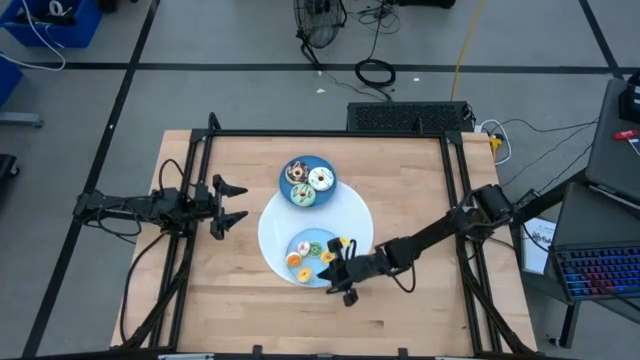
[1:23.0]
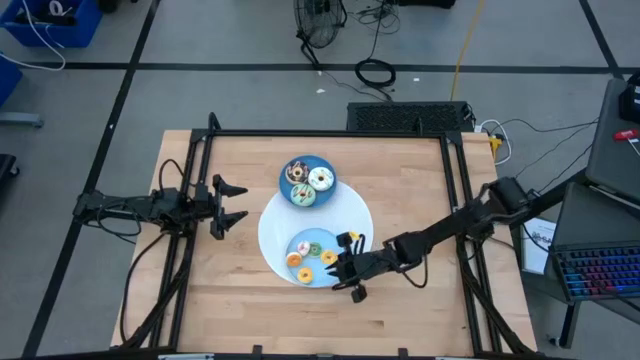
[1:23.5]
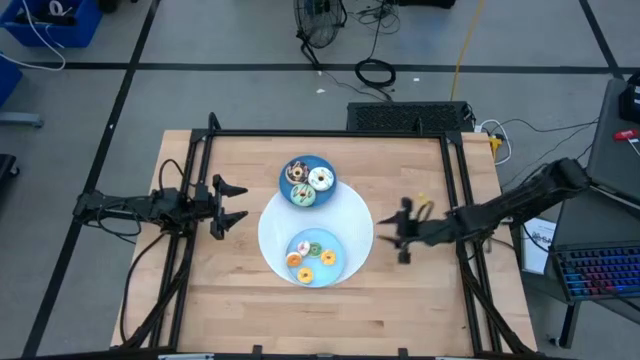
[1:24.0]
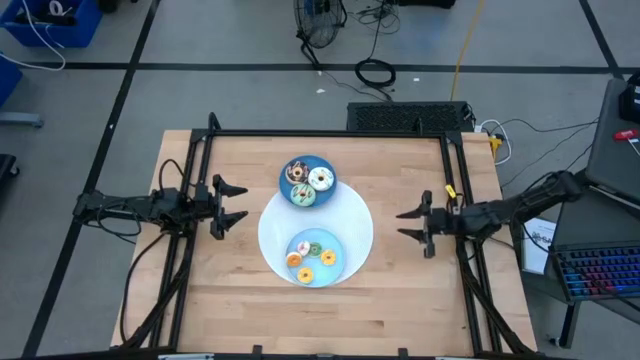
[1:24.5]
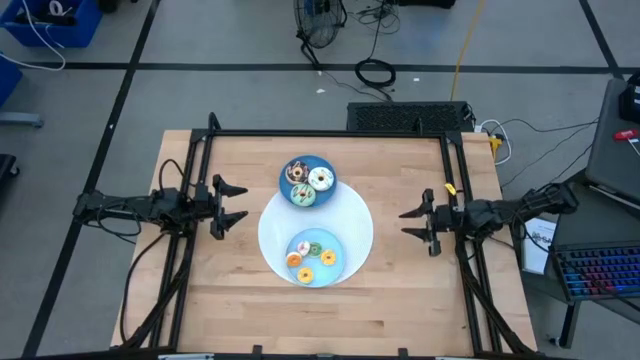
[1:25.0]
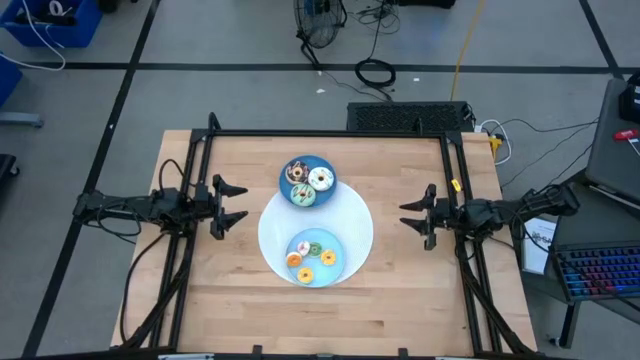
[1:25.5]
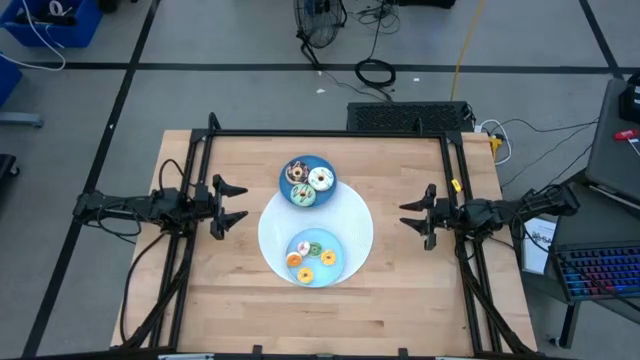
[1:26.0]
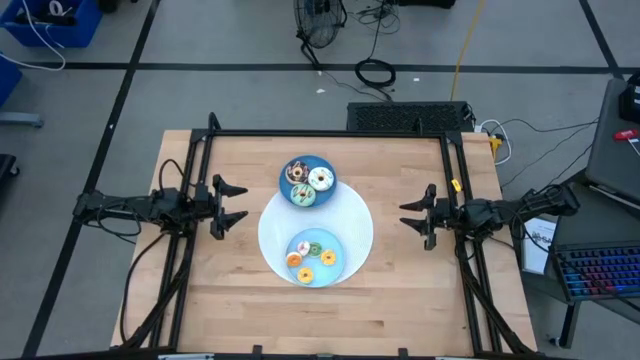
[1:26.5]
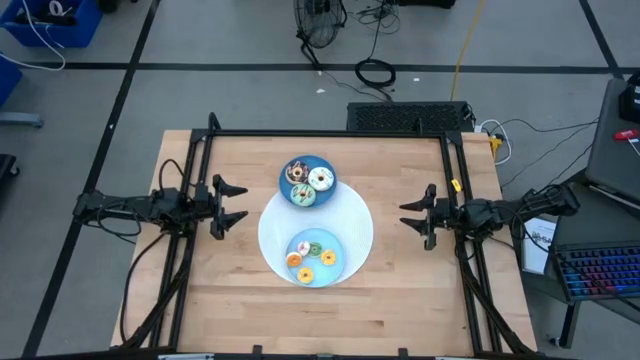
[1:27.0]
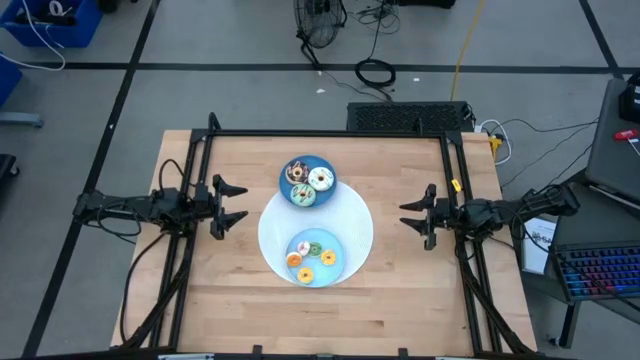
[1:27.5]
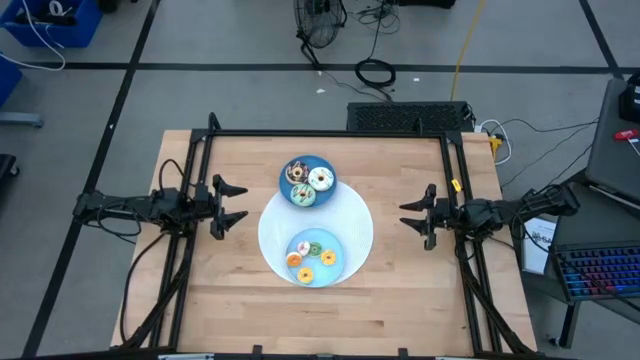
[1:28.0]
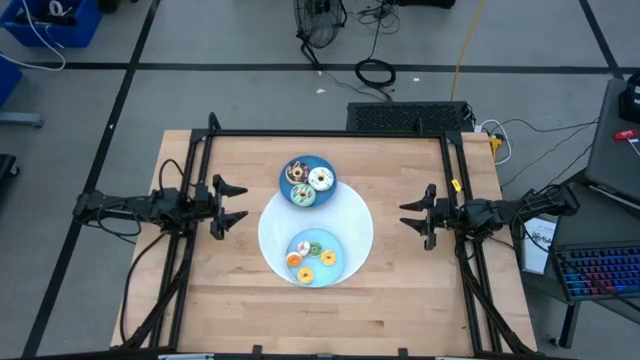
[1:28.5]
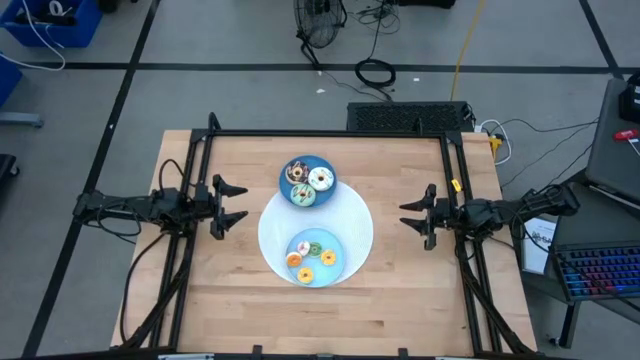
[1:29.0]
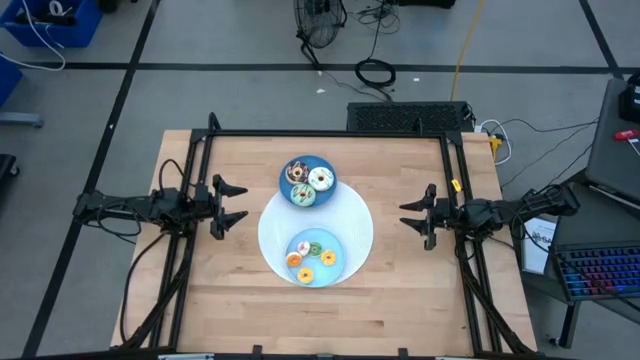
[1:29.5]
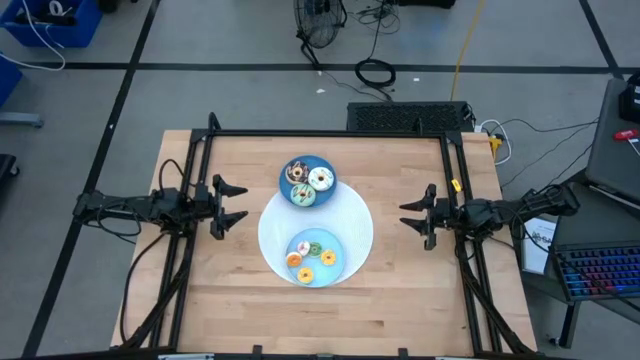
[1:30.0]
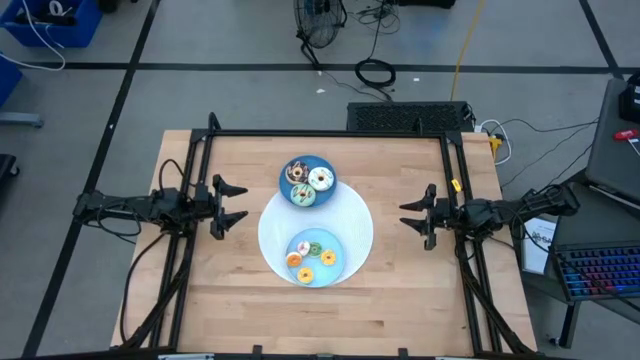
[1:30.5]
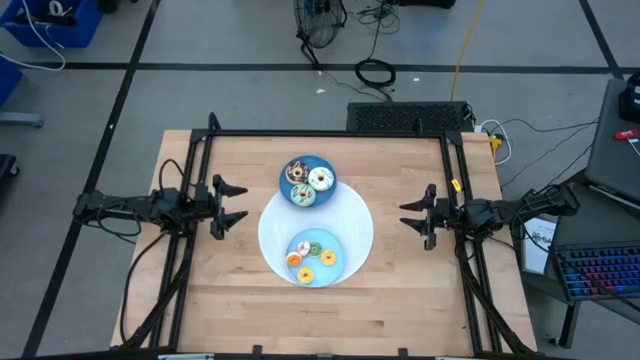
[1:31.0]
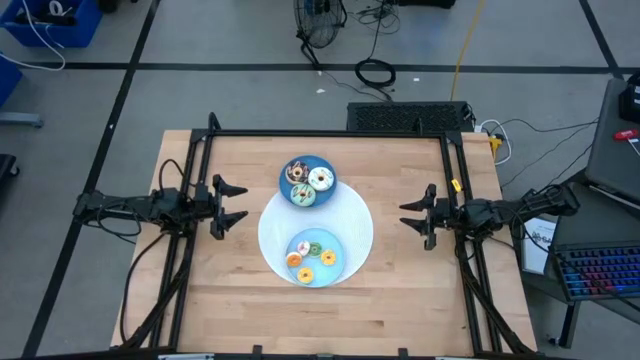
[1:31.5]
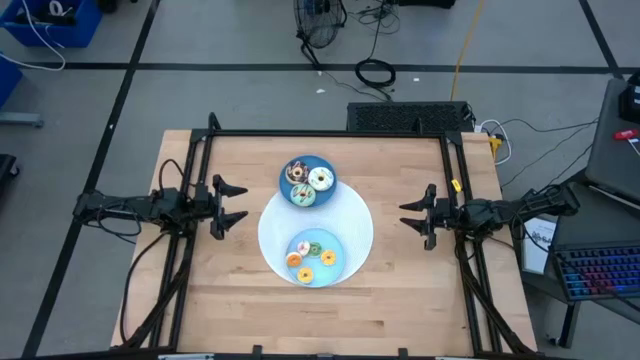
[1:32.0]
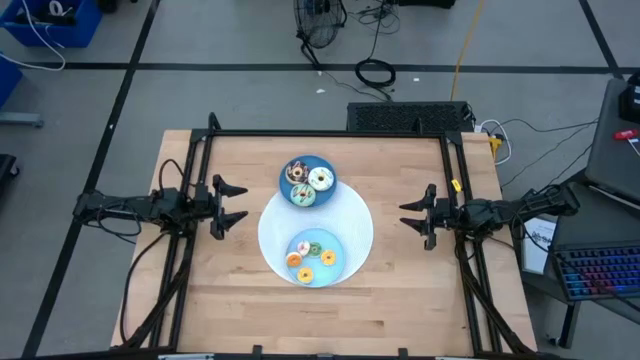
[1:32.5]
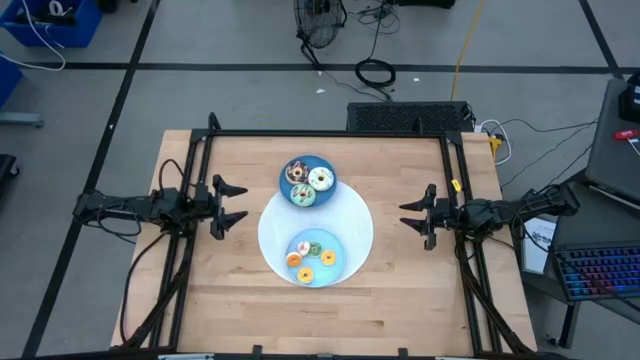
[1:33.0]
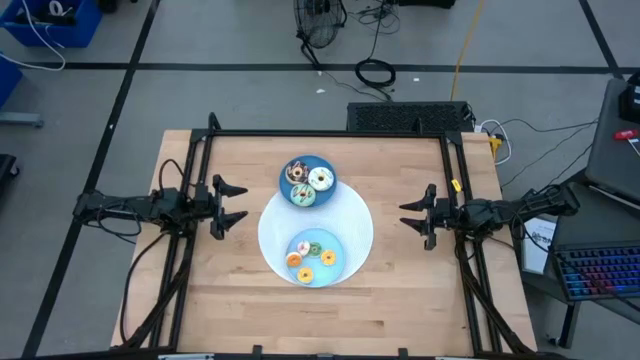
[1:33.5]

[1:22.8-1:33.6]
Task: Pick & Place donuts
Return to Home Position

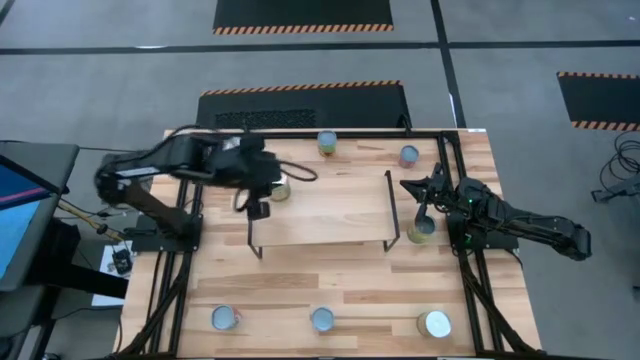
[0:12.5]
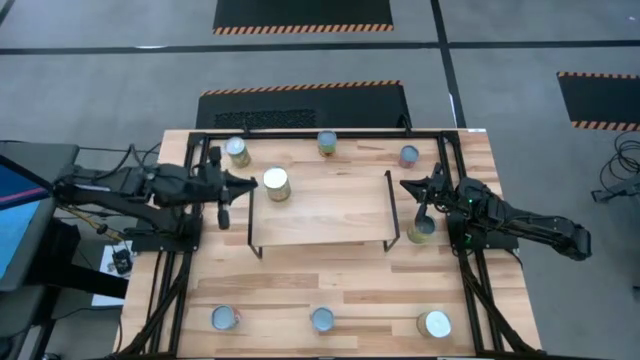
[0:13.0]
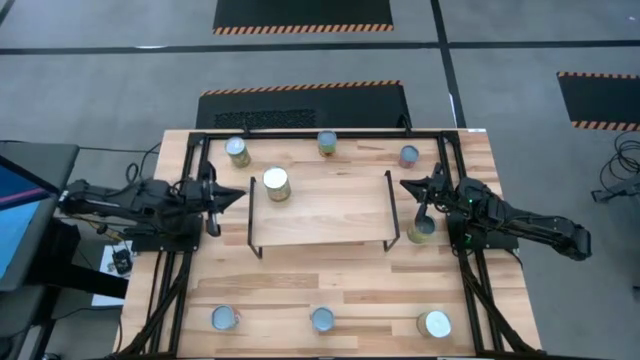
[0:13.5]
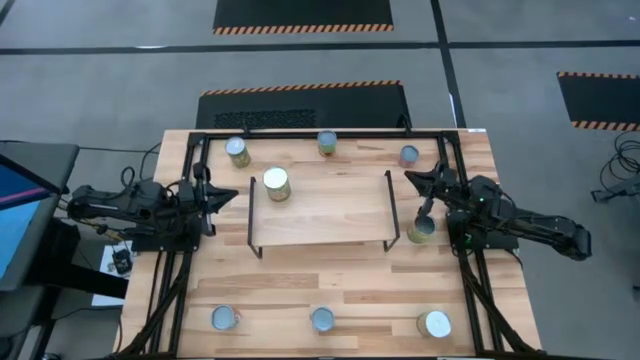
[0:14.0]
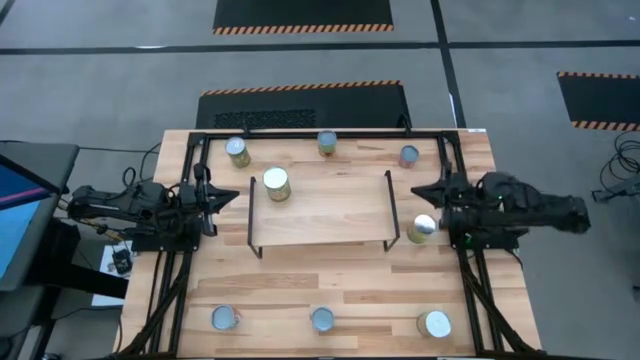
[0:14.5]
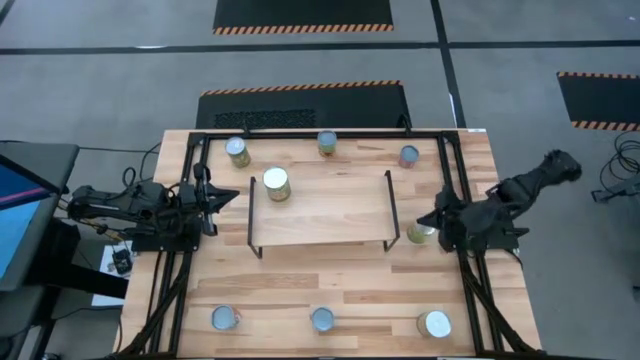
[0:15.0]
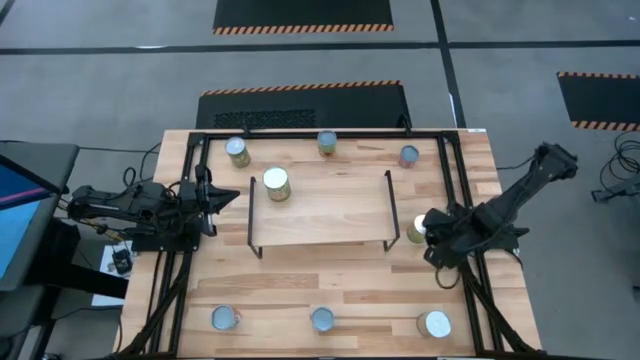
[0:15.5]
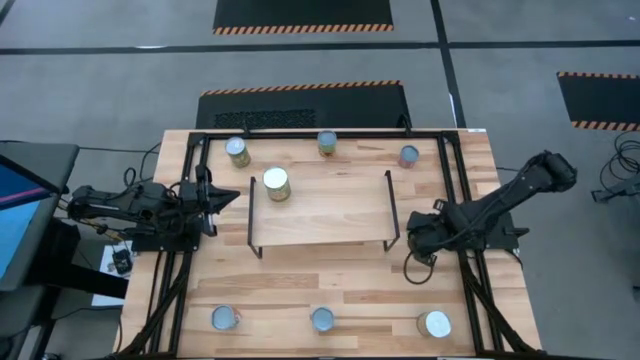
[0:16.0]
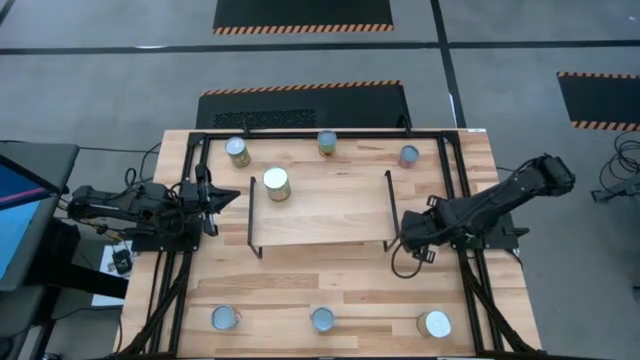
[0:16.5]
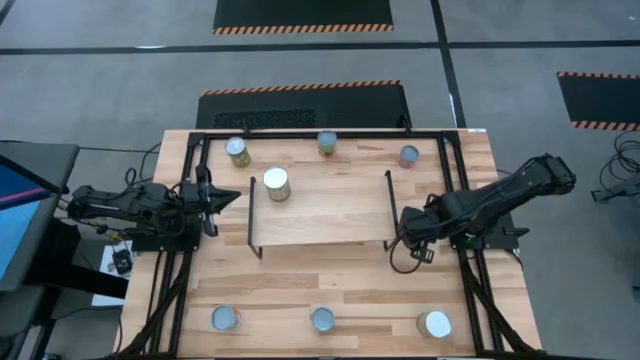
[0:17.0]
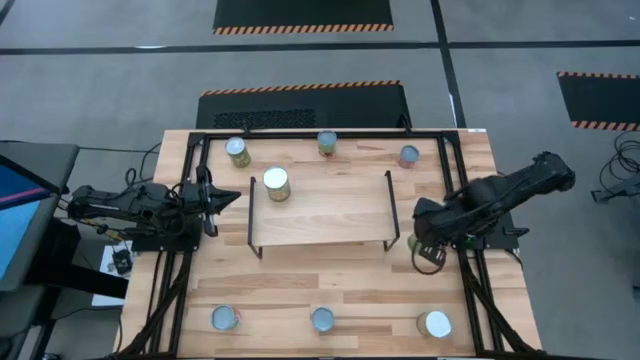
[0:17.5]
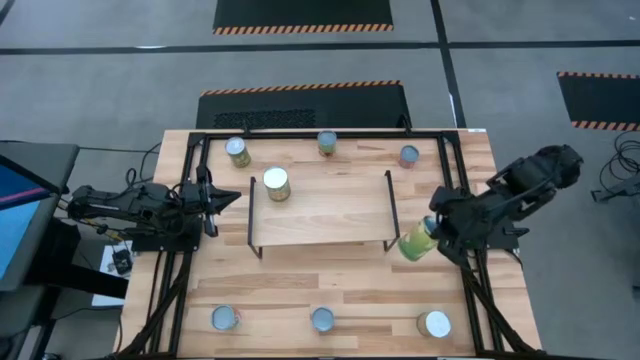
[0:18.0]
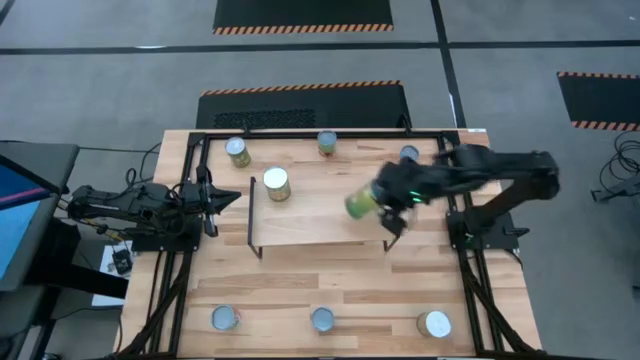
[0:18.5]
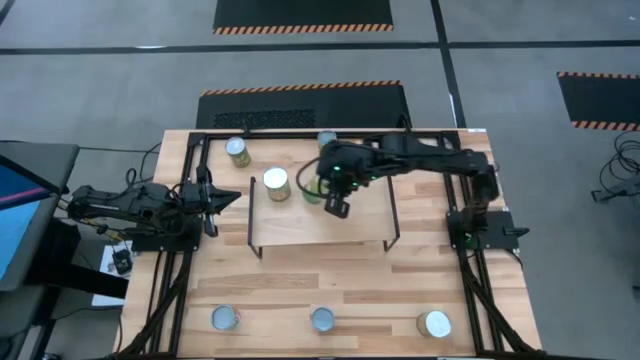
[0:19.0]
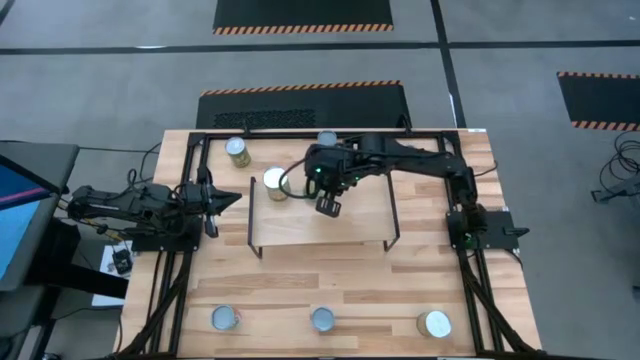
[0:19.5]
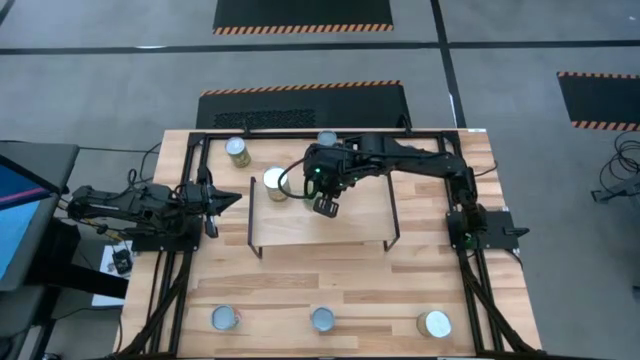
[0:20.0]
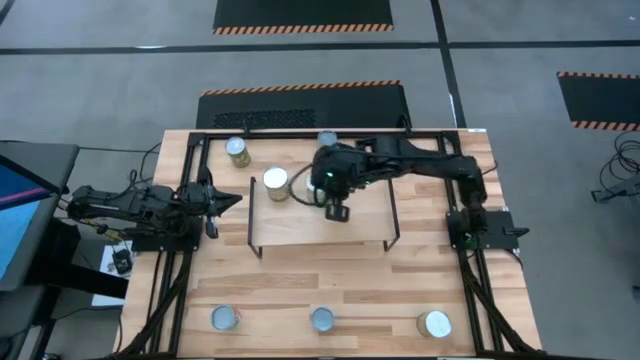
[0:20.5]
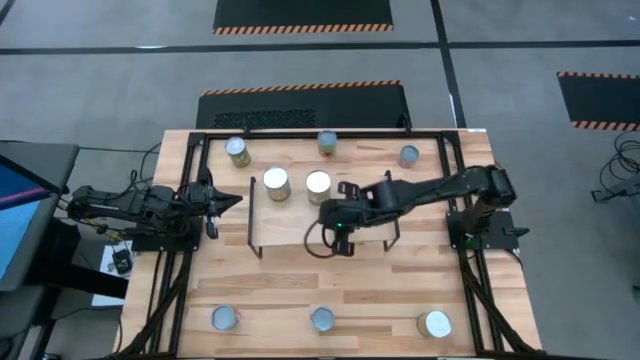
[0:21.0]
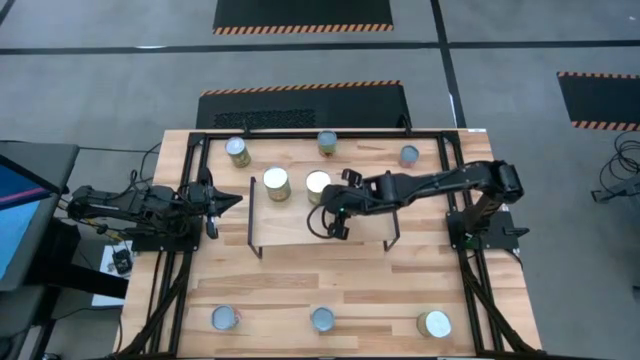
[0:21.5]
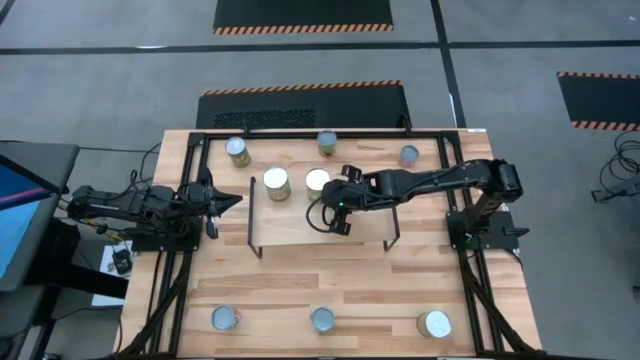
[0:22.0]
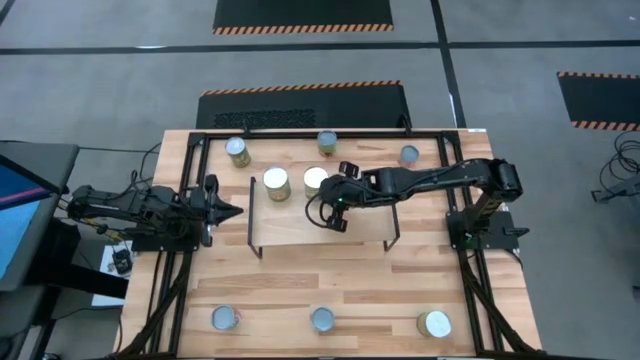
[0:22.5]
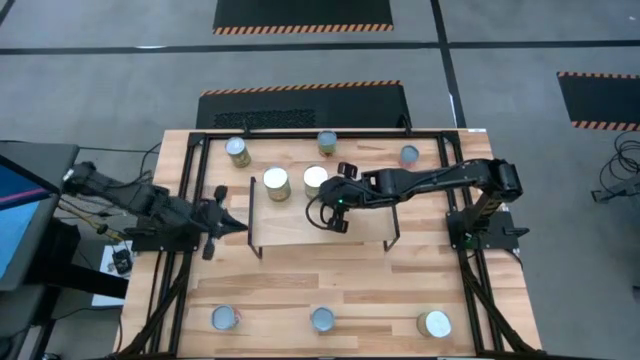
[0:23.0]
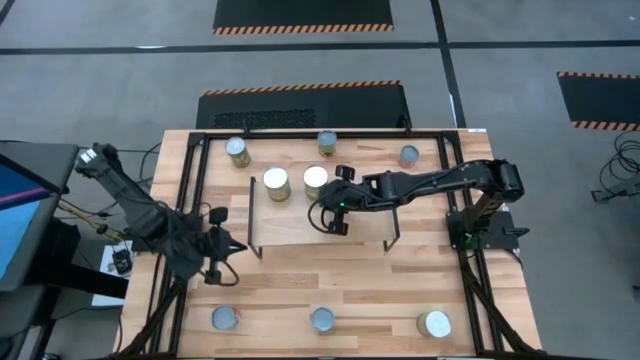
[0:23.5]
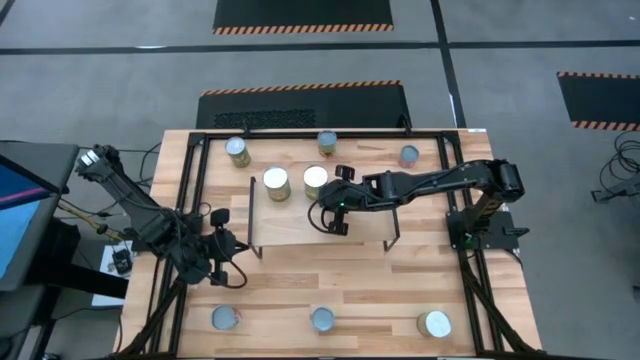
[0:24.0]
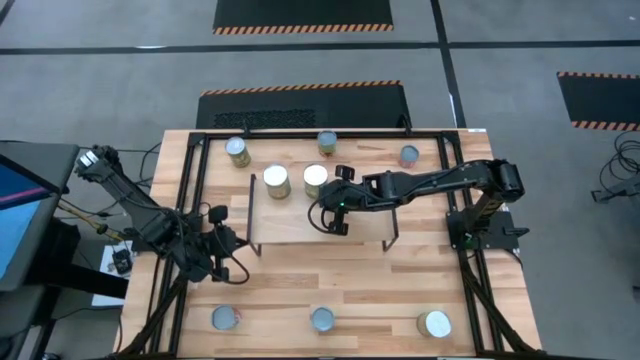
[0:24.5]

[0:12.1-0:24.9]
Task: Pick and place cans onto a shelf
Put the bottom canned pears on the shelf
